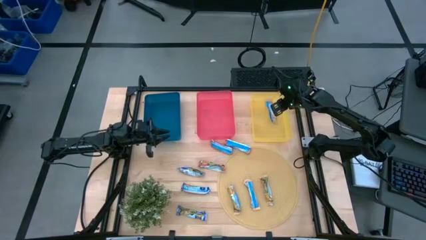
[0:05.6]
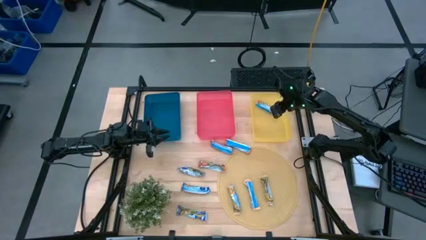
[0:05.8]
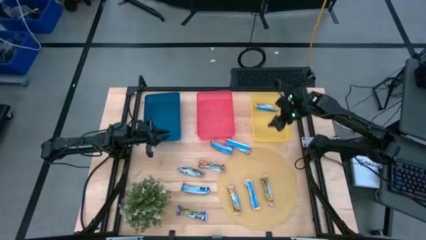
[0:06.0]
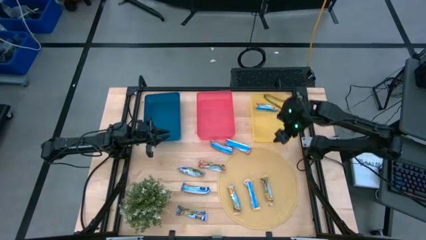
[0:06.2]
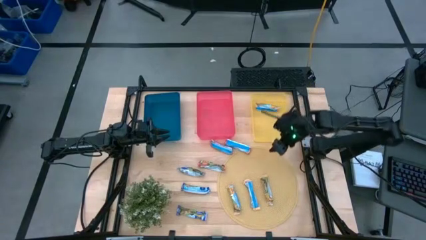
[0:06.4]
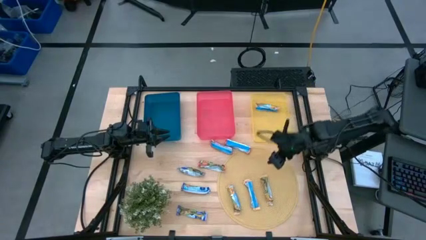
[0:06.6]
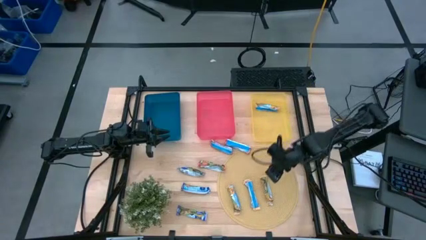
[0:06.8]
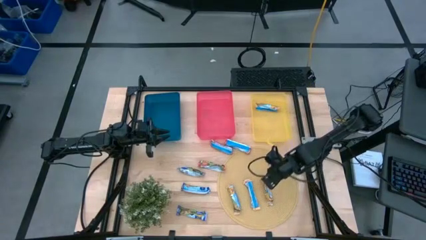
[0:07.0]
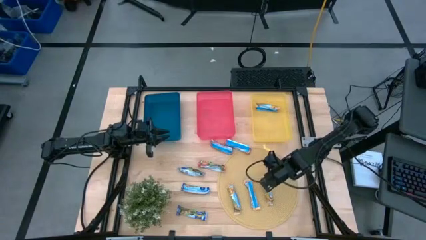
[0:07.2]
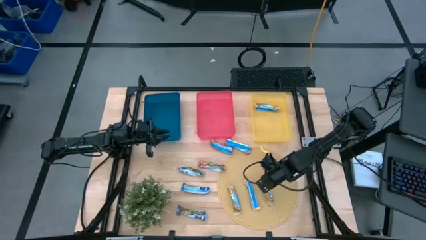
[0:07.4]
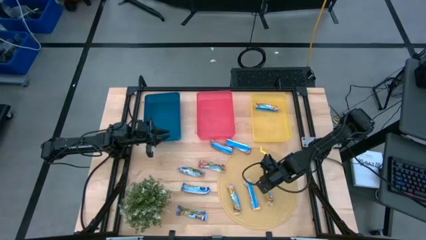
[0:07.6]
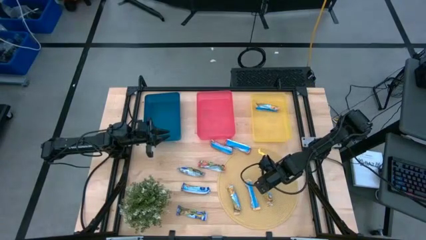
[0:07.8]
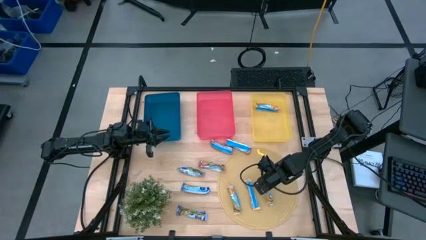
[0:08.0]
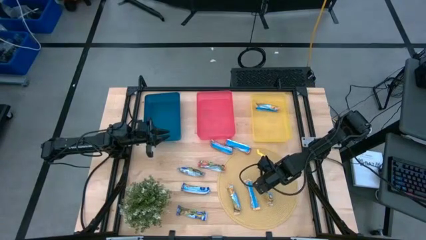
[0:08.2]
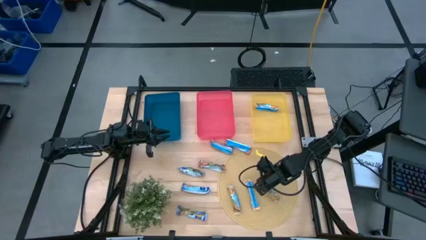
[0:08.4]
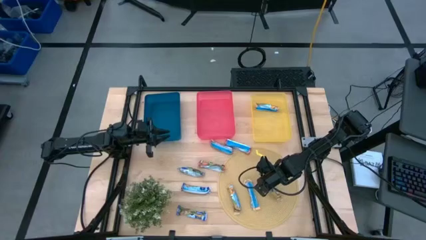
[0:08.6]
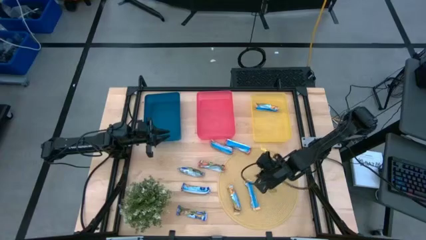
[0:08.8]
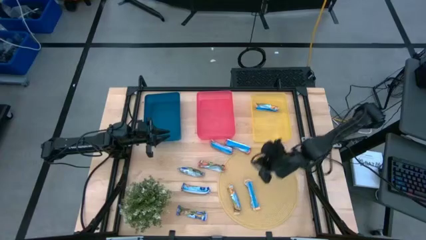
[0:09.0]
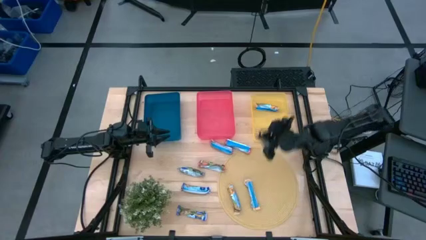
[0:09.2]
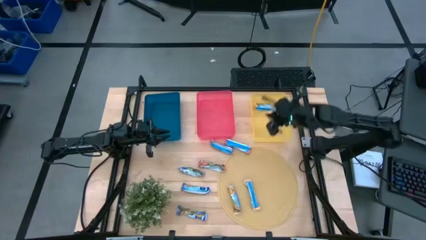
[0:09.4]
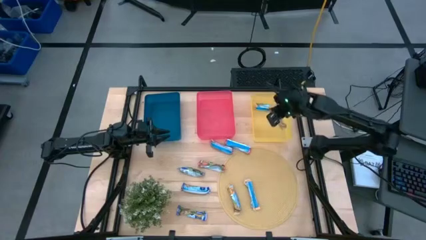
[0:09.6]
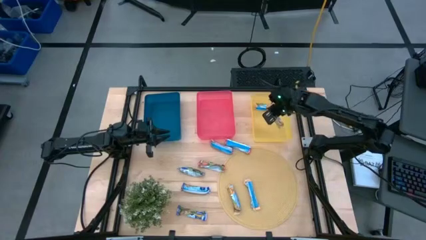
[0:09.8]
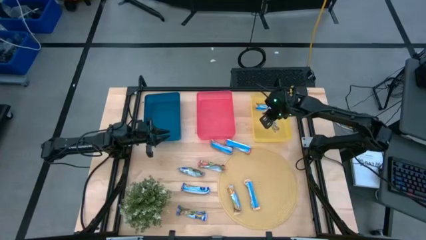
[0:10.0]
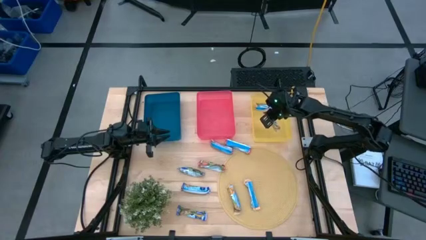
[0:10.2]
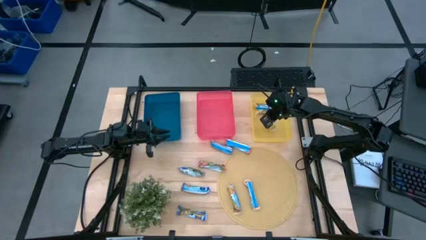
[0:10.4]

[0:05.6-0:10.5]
Task: Pick and place Granola Bars by type
Put the yellow granola bar into the yellow bin

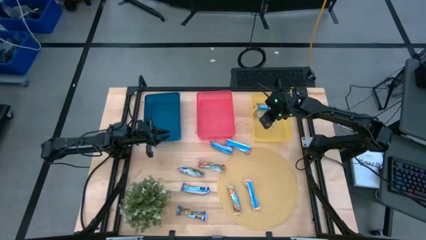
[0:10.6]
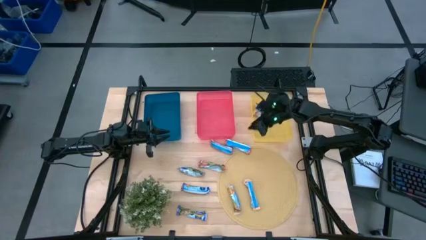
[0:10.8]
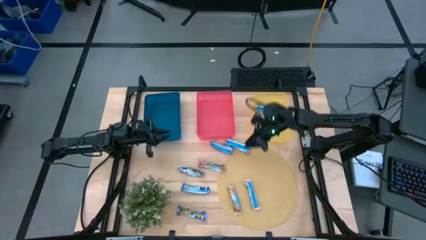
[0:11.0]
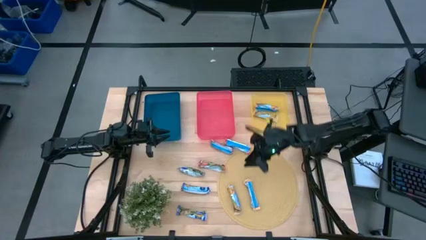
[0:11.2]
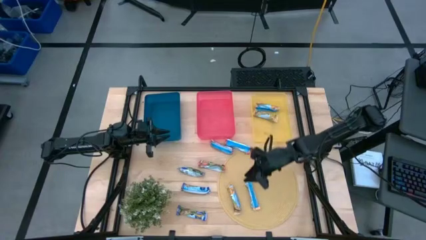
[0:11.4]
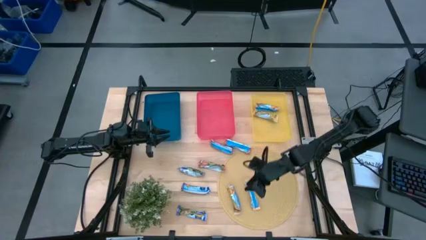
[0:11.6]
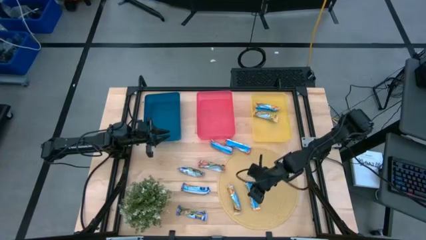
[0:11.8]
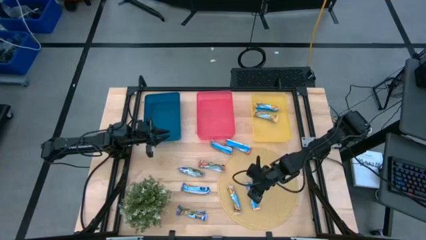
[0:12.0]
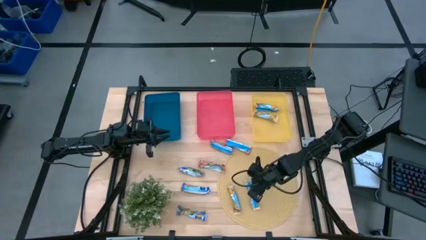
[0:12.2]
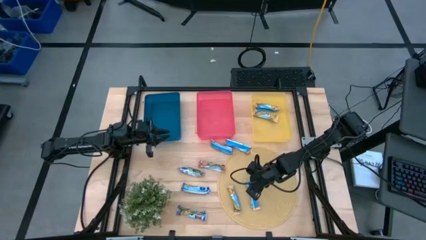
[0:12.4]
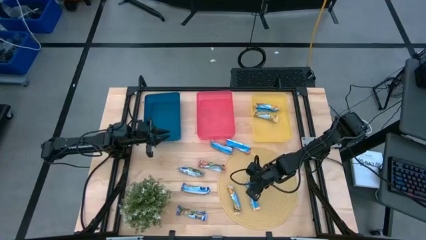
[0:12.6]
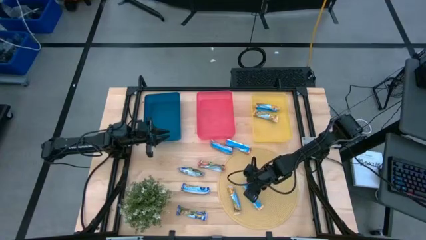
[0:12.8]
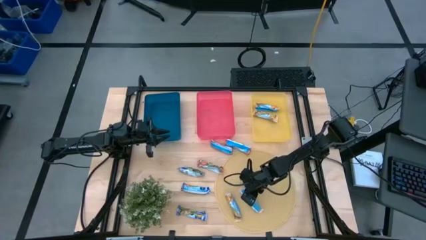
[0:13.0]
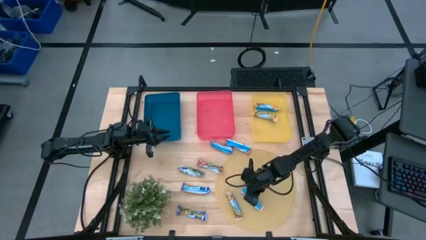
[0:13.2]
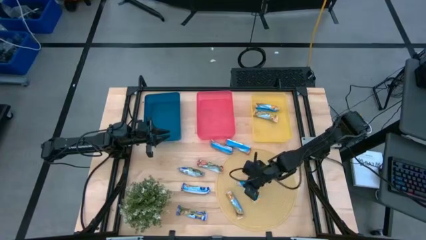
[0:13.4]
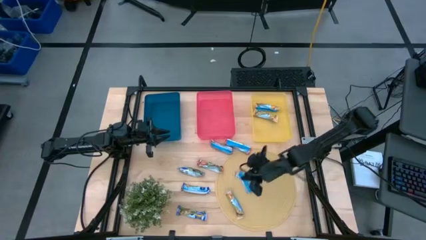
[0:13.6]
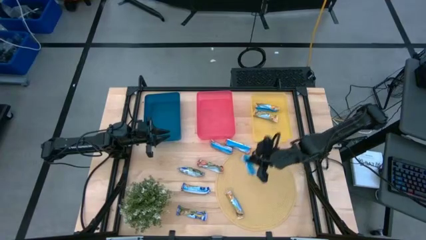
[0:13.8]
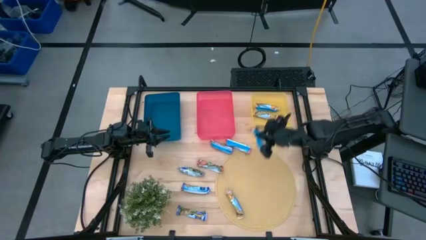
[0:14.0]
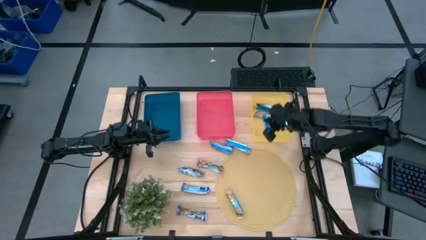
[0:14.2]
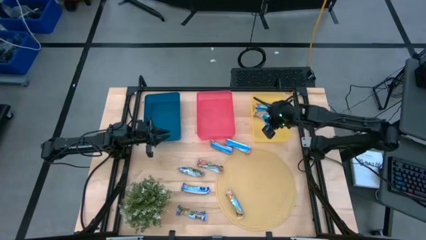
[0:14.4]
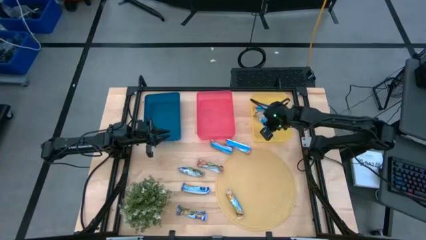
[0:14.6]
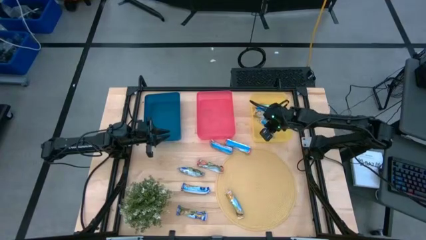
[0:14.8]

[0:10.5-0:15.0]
Put the yellow granola bar into the yellow bin

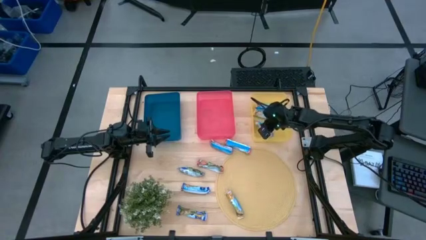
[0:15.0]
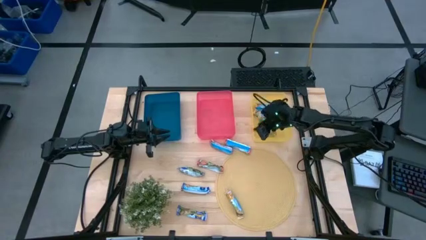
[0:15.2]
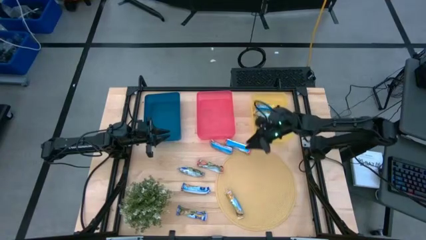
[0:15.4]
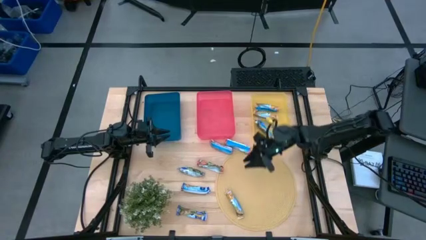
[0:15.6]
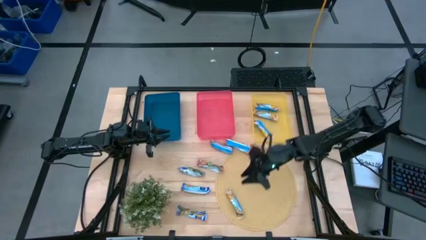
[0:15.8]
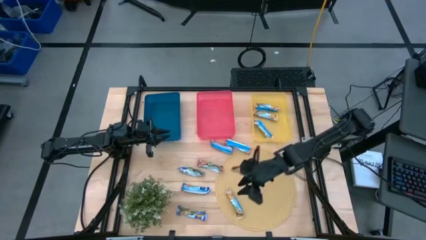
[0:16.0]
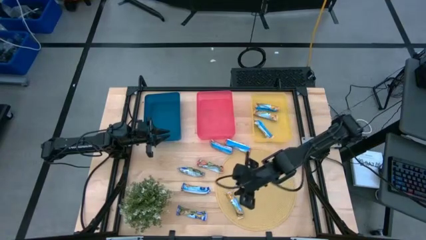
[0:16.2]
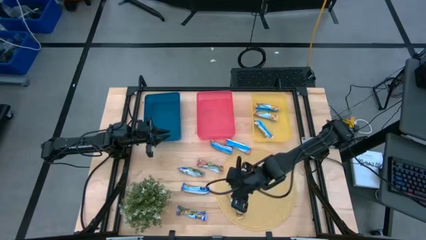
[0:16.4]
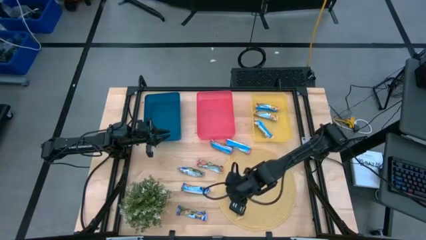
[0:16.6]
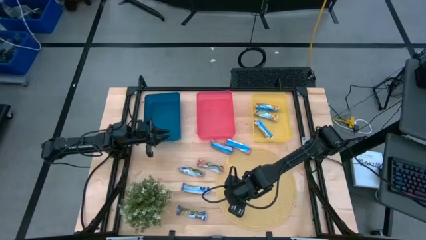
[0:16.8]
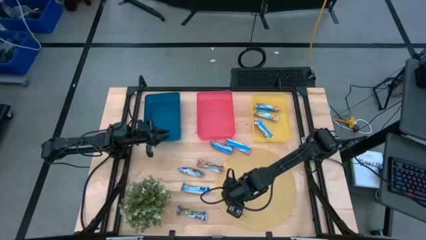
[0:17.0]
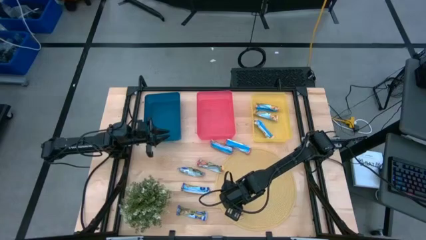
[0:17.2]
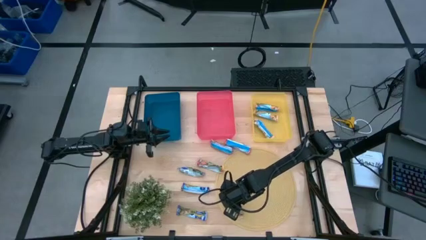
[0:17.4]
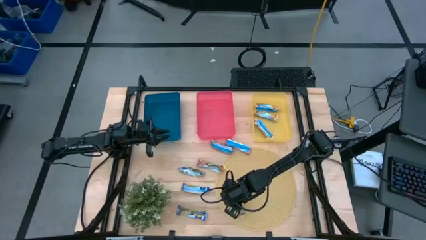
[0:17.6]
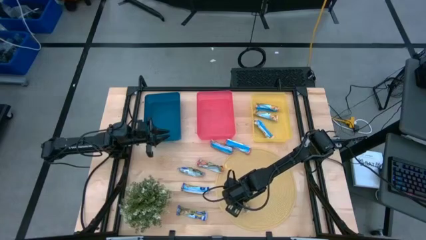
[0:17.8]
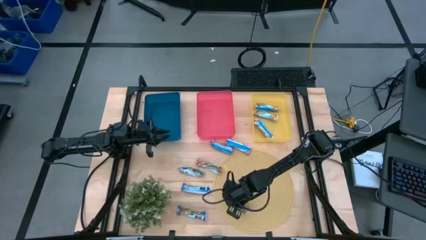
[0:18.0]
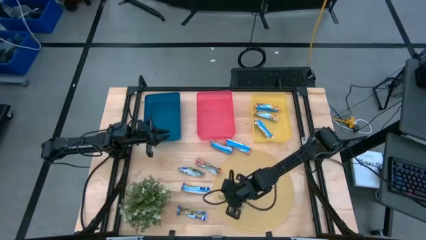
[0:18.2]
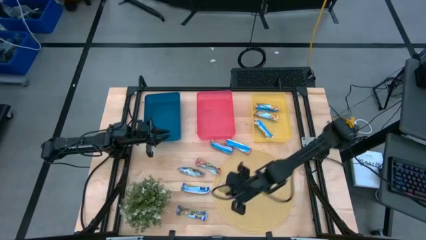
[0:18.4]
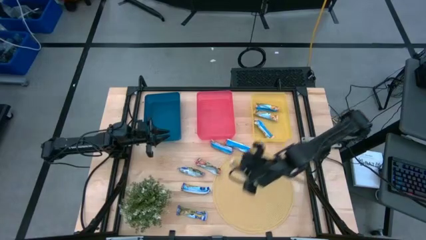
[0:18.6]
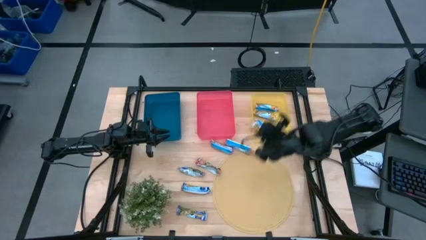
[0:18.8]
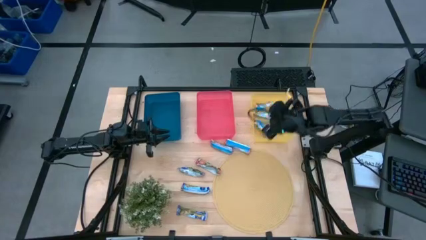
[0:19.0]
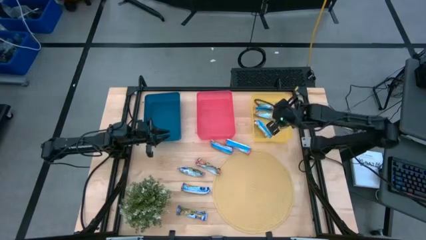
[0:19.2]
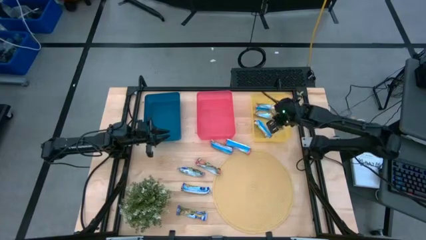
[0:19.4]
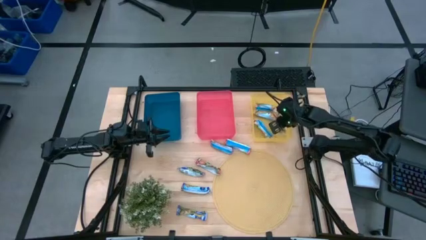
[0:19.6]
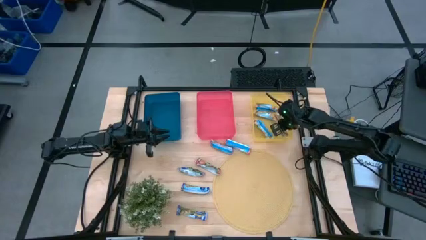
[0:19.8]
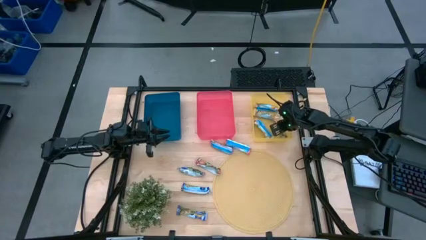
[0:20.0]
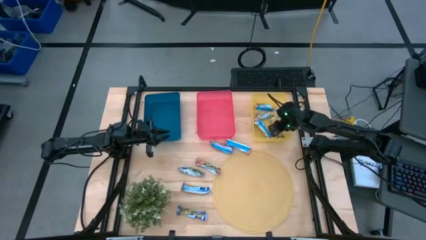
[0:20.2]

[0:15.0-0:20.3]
Put the yellow granola bar into the yellow bin

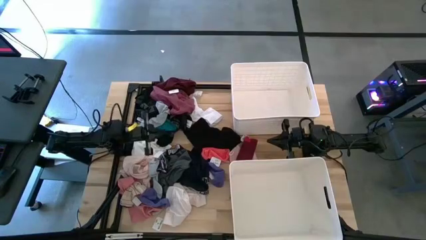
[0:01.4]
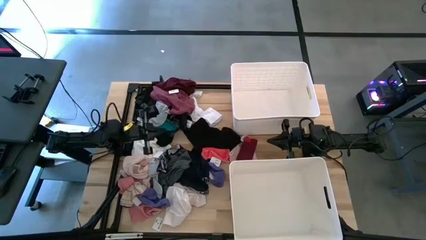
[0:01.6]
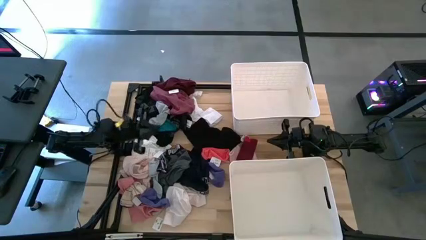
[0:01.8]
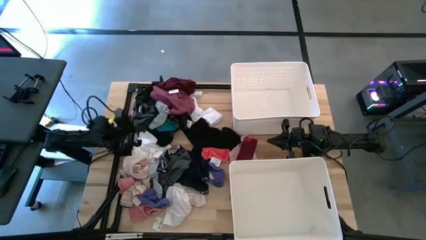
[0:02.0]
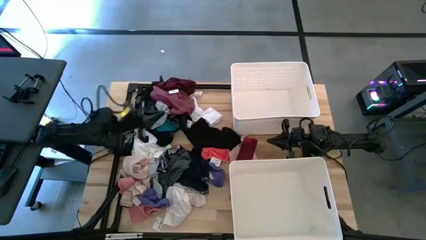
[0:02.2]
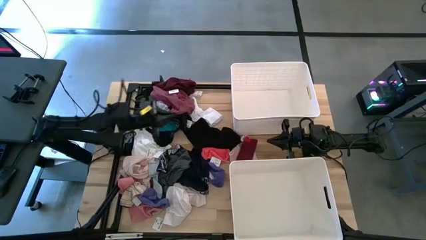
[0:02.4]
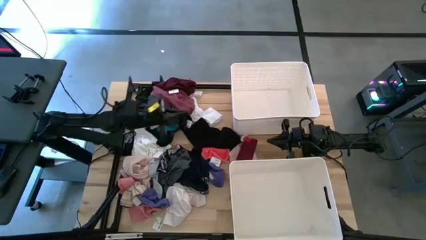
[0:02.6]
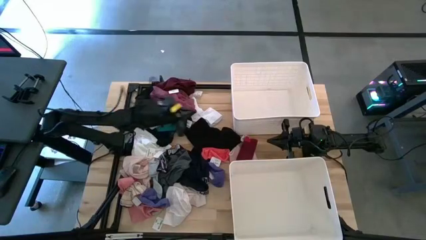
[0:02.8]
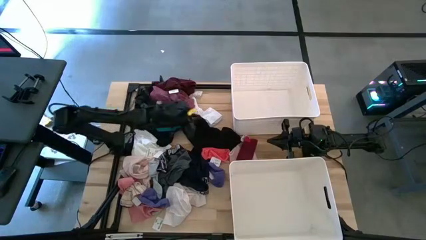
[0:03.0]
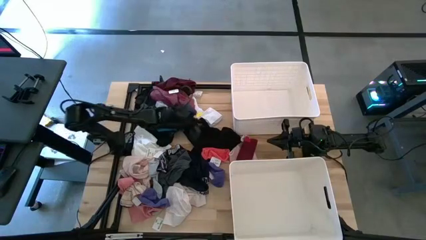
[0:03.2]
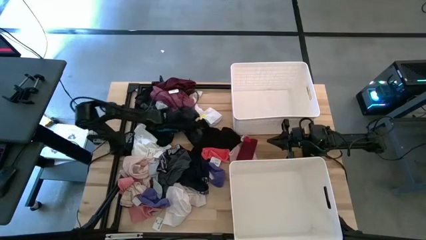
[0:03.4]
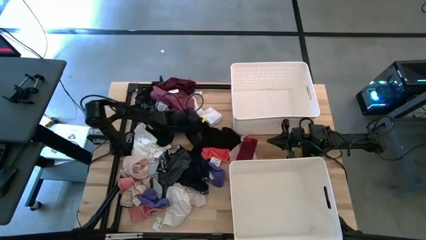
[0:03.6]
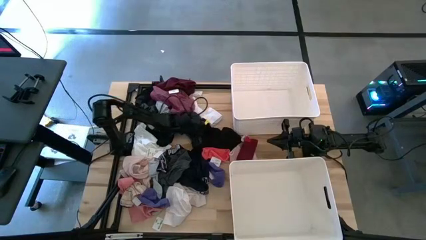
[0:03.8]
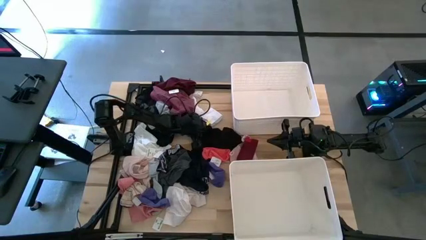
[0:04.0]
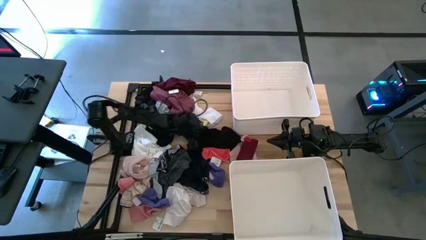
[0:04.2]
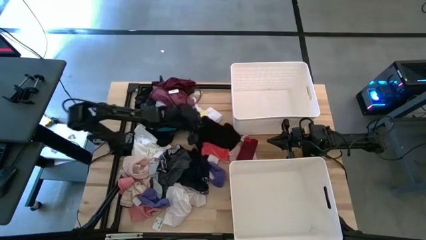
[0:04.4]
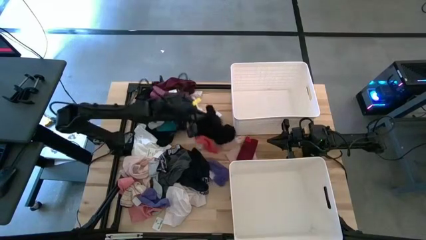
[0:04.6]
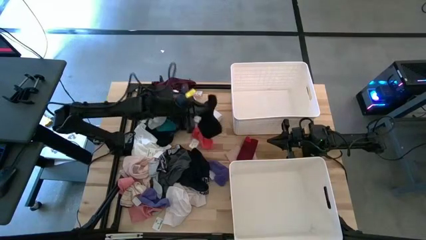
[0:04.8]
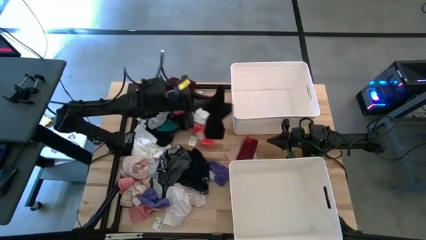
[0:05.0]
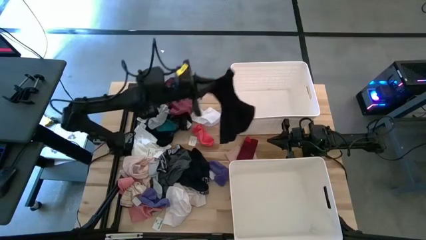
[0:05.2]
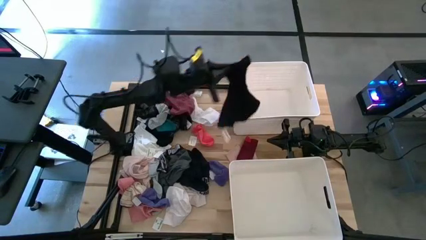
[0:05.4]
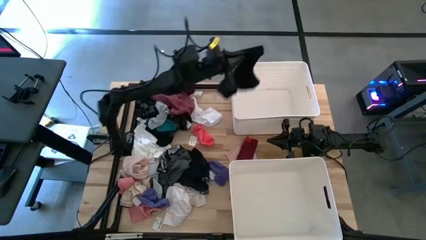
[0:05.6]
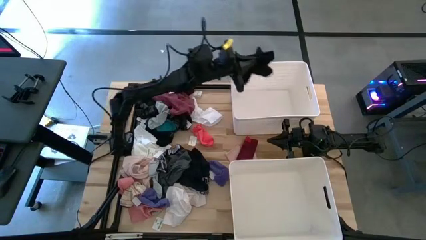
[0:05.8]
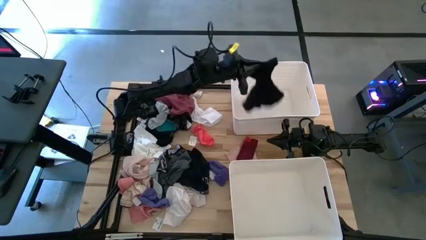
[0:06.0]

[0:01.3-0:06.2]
Task: Sort clothes
Put the black sock into the top bin
